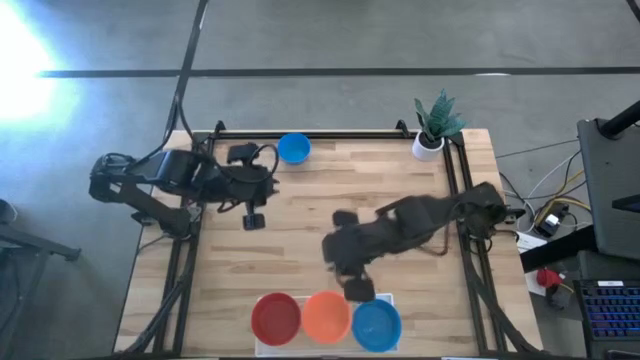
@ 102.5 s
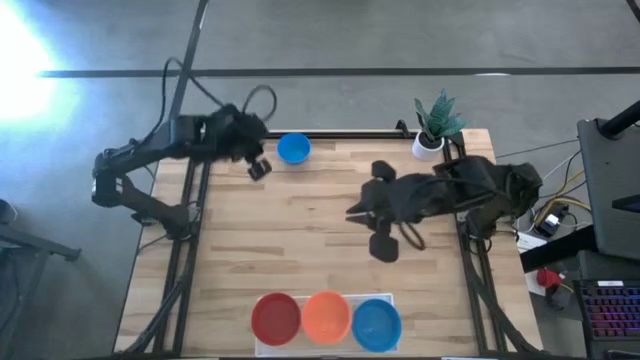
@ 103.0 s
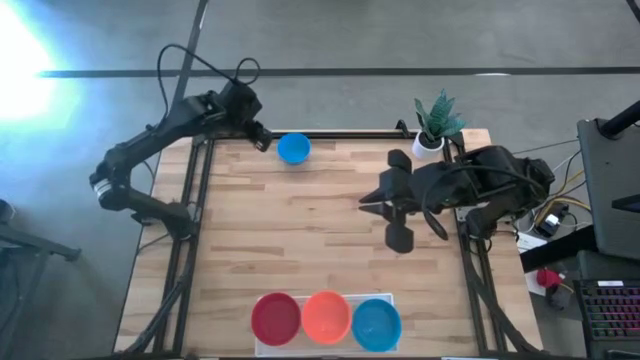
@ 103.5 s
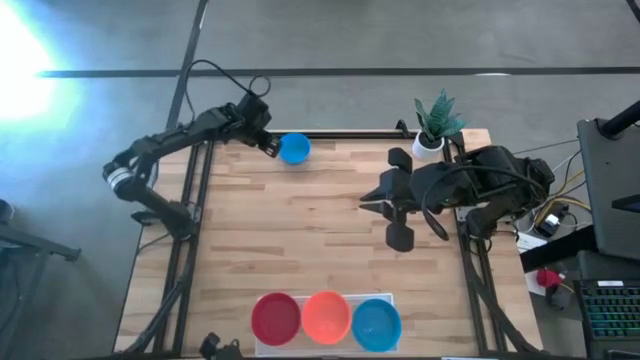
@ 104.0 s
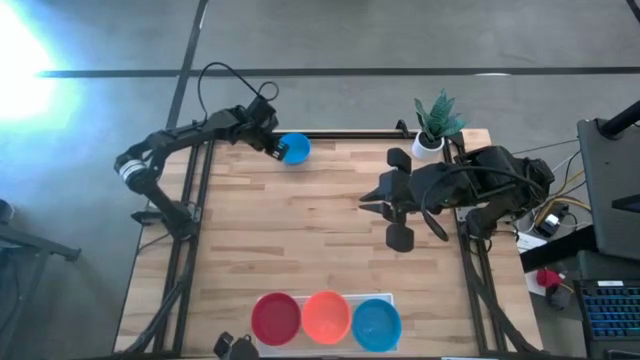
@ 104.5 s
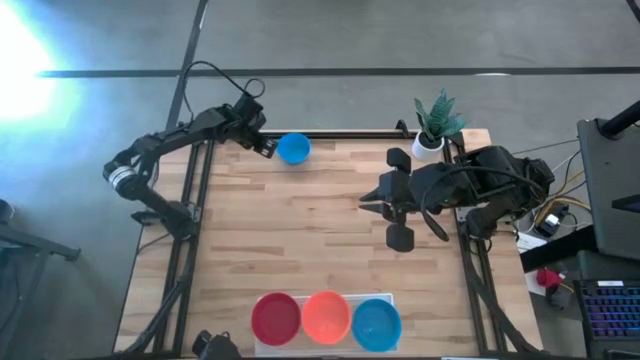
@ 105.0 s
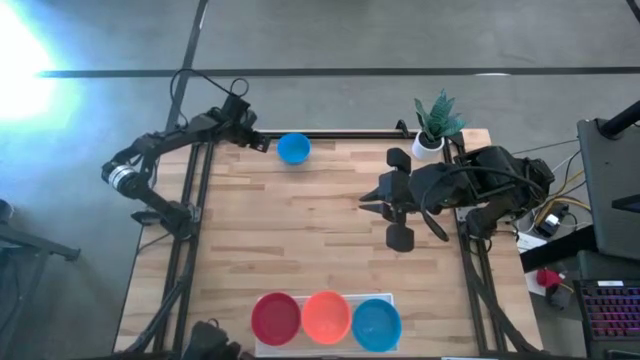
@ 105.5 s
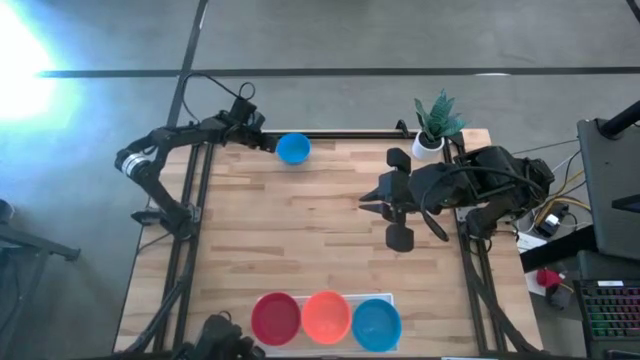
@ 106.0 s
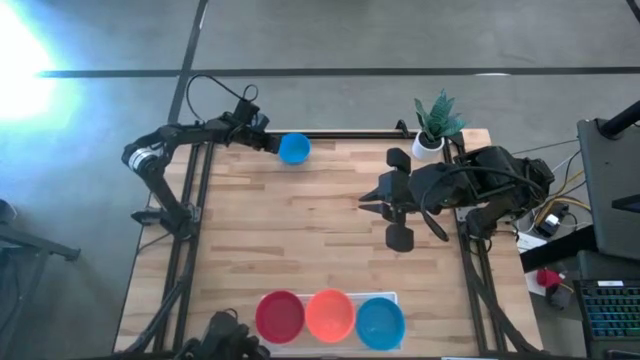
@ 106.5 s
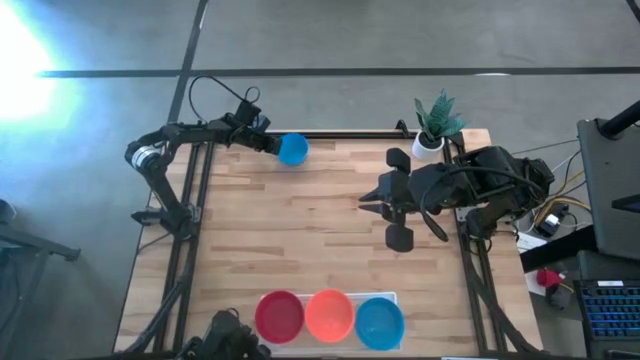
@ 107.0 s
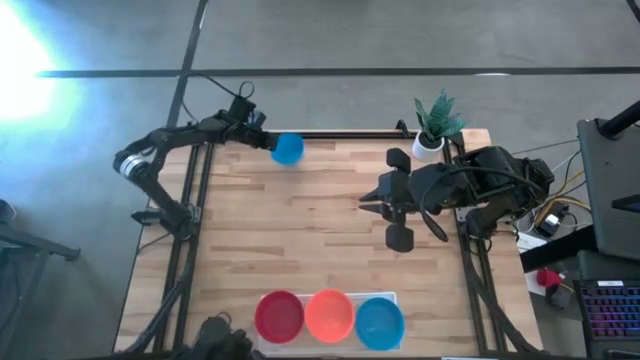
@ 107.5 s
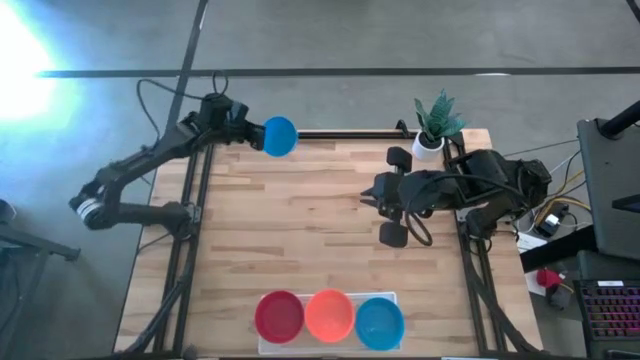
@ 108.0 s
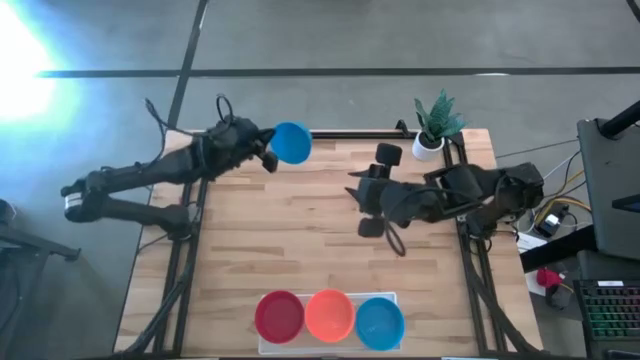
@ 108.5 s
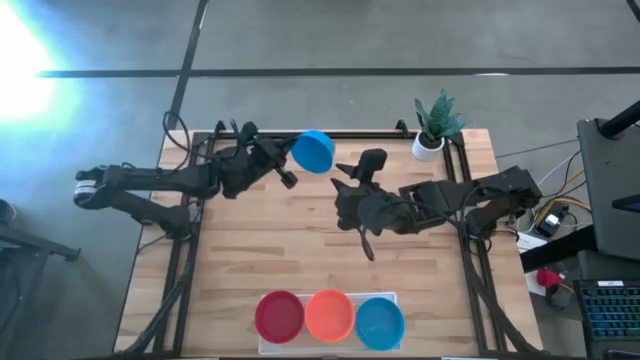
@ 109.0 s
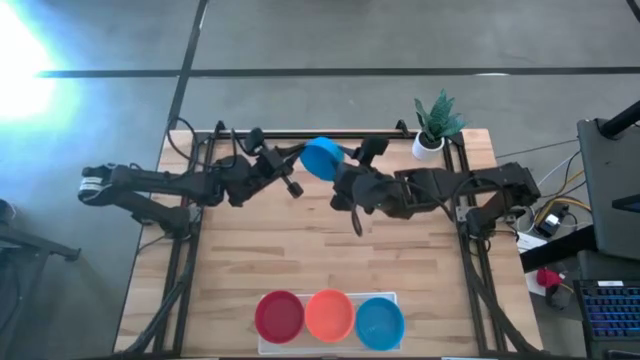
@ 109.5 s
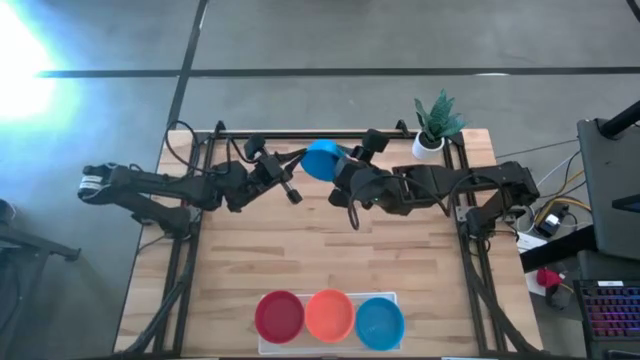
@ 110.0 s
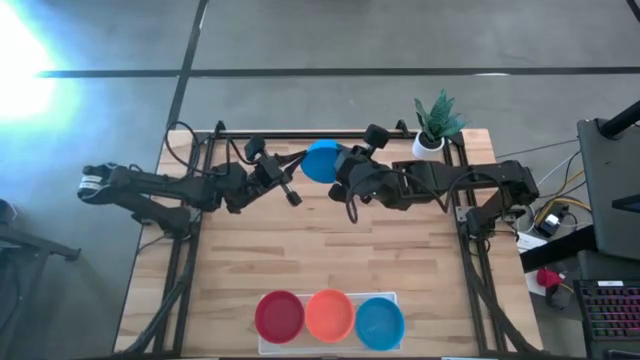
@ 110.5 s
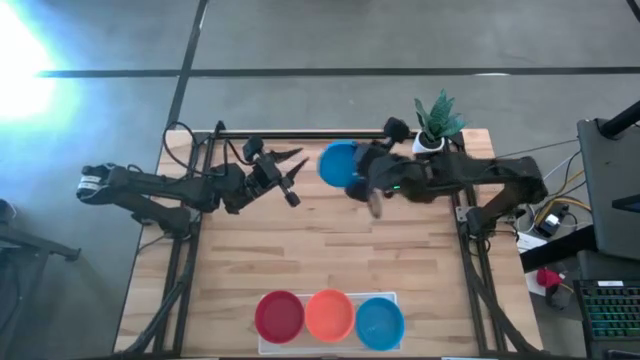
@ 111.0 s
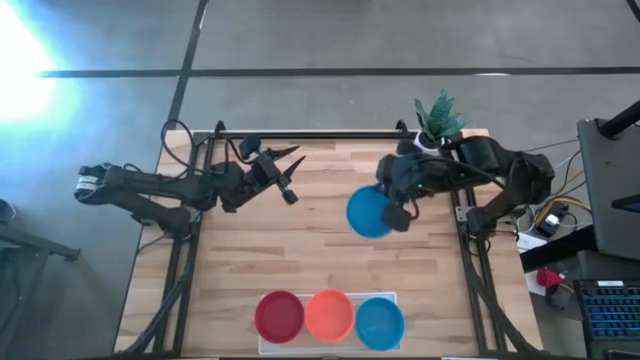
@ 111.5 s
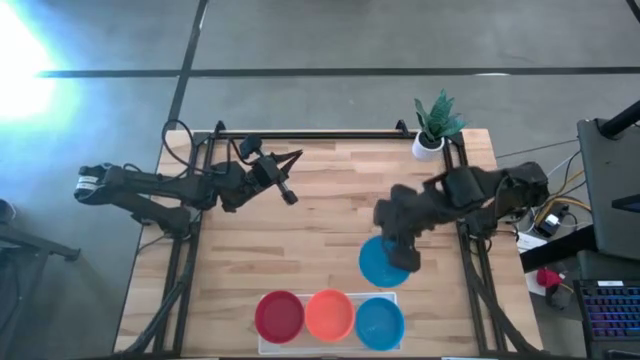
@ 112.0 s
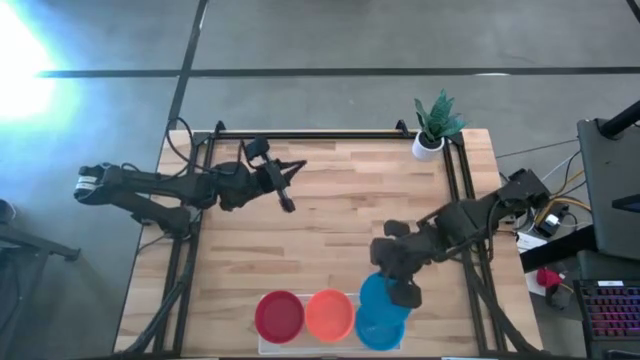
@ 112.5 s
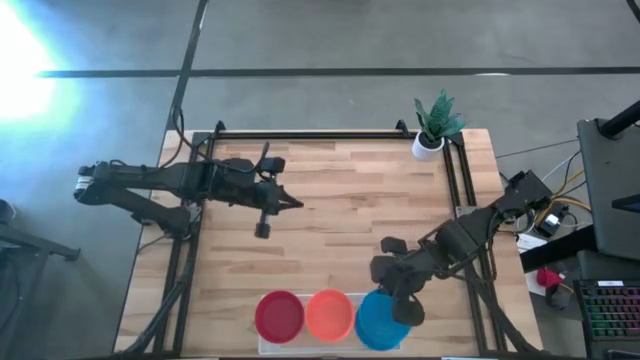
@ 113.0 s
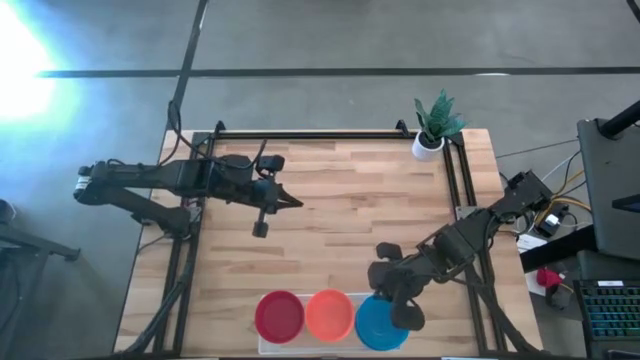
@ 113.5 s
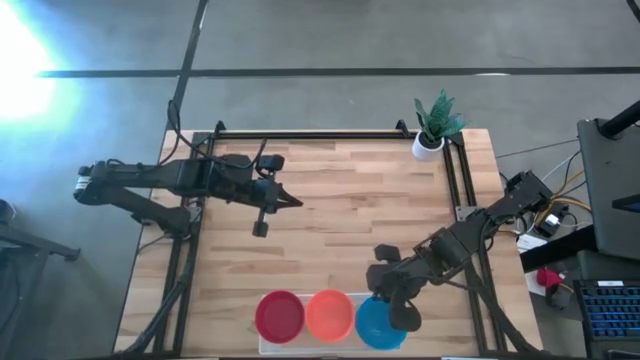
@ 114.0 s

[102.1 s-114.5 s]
Task: Pick & Place Mini bowls
Stack the blue bowl on top of the other blue bowl on the shelf

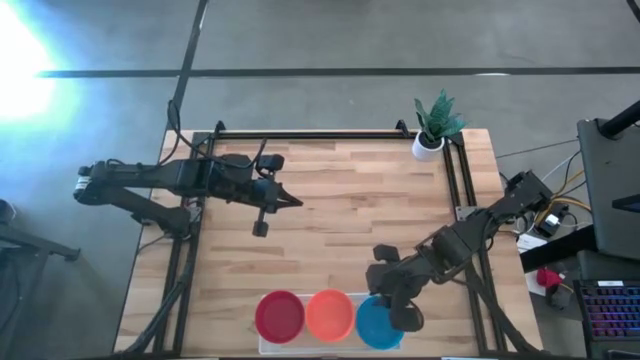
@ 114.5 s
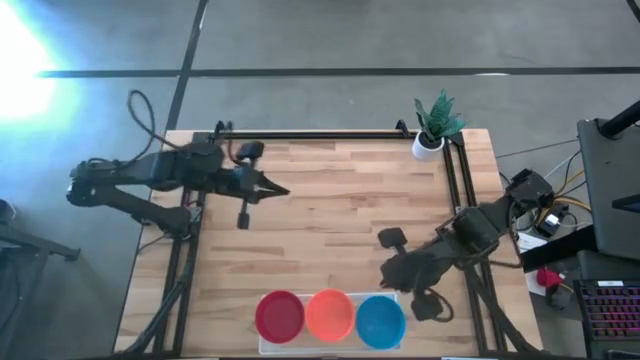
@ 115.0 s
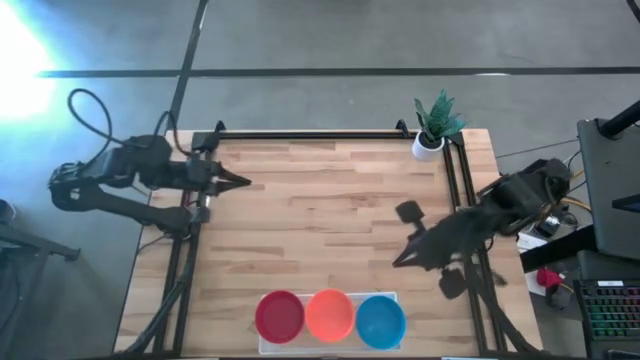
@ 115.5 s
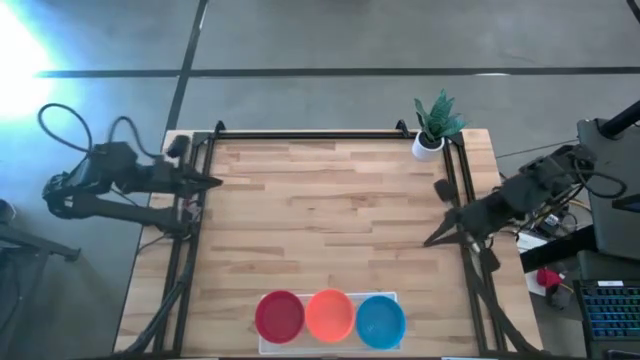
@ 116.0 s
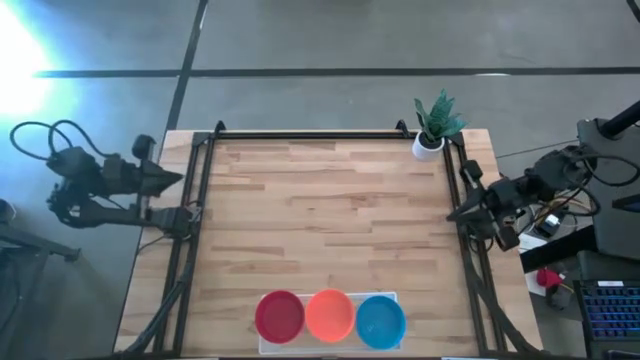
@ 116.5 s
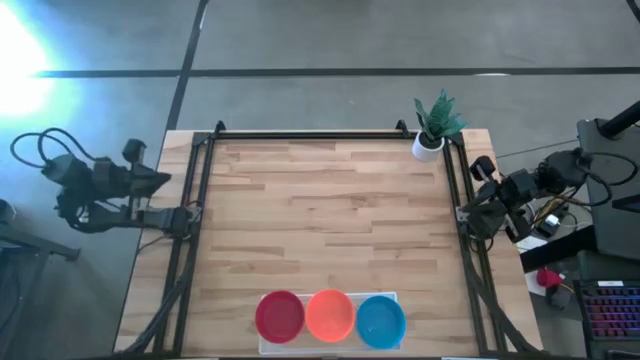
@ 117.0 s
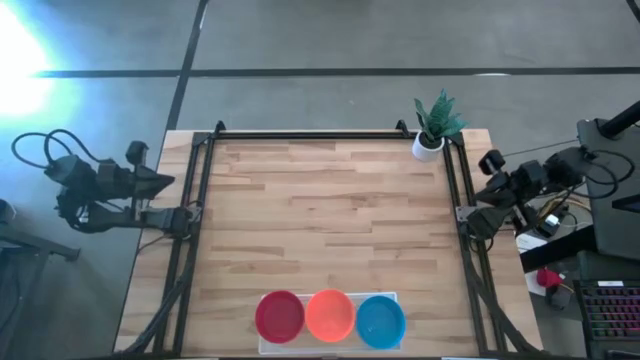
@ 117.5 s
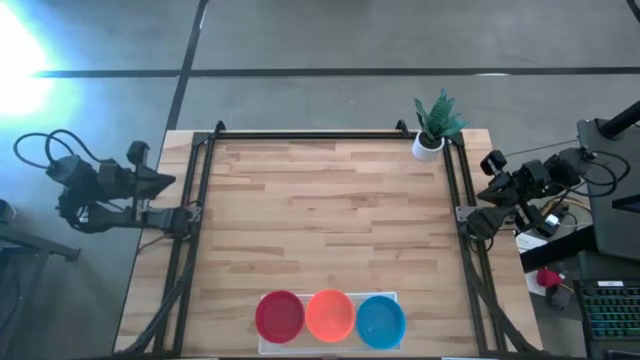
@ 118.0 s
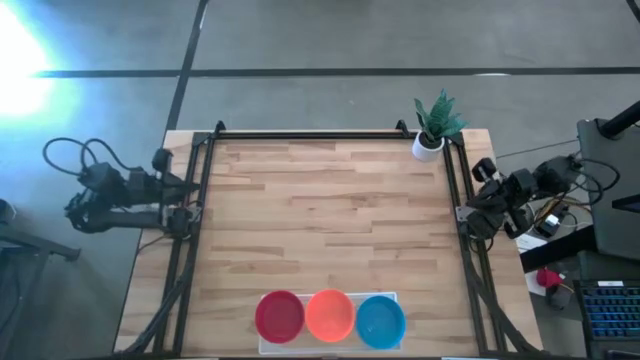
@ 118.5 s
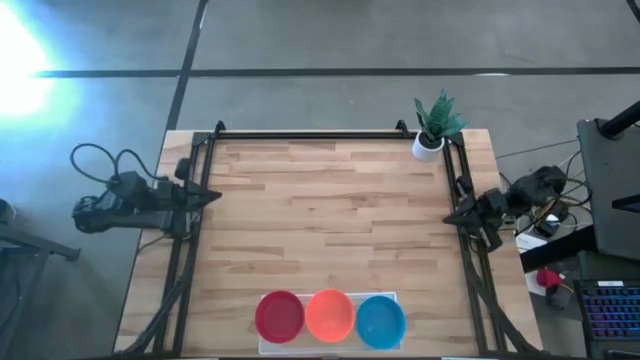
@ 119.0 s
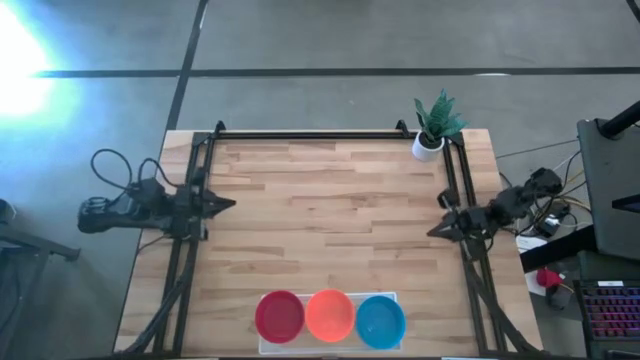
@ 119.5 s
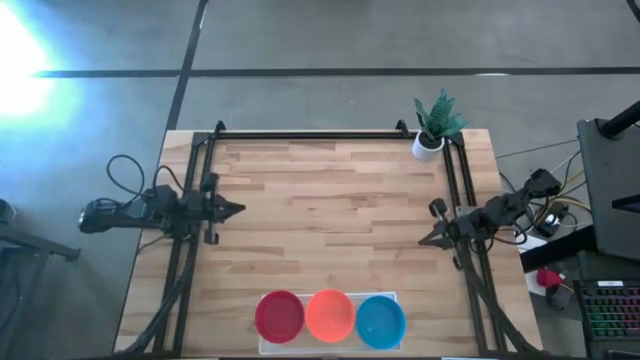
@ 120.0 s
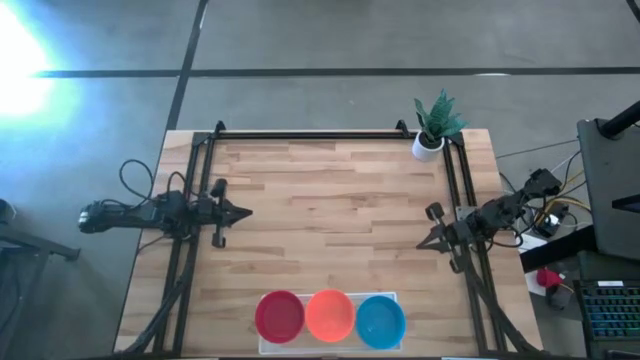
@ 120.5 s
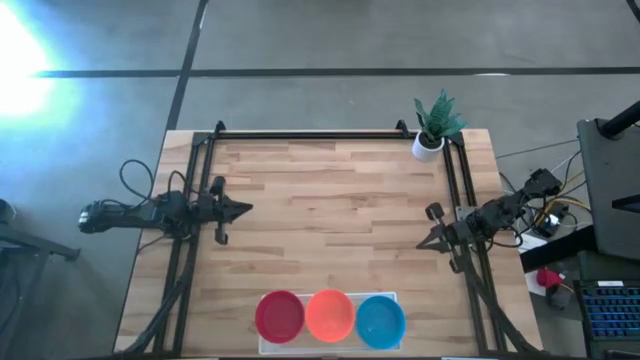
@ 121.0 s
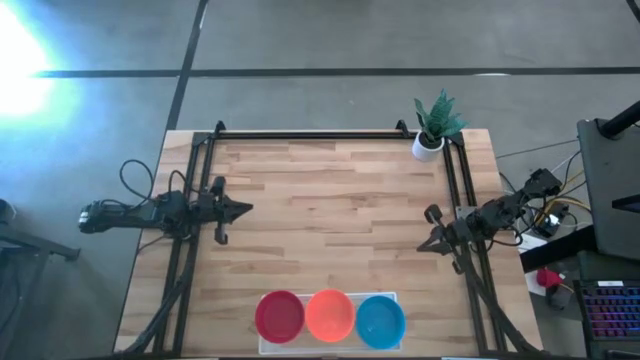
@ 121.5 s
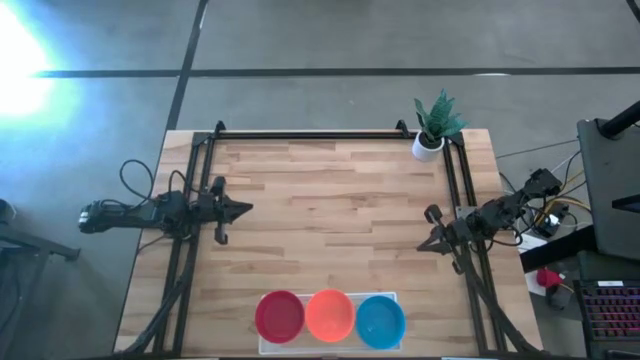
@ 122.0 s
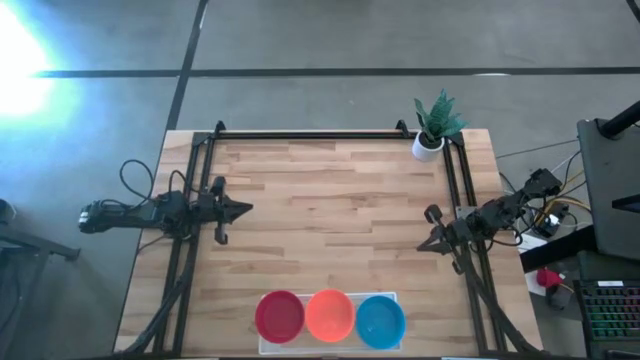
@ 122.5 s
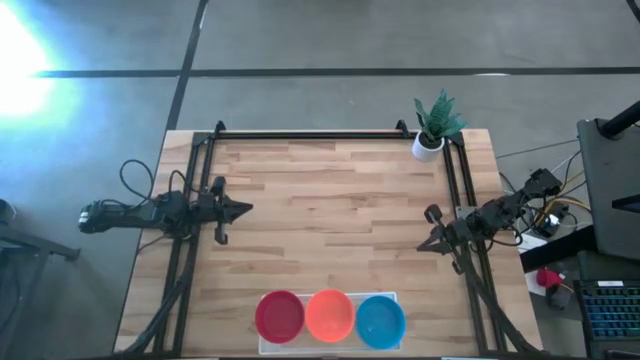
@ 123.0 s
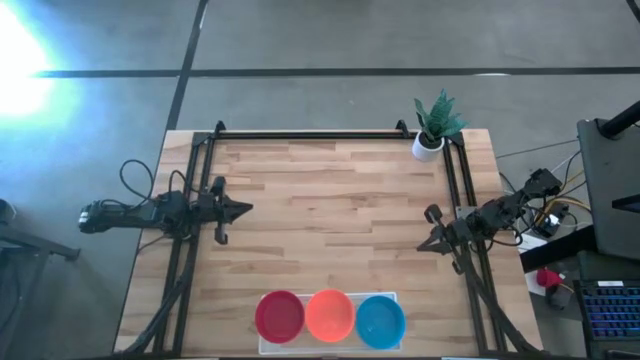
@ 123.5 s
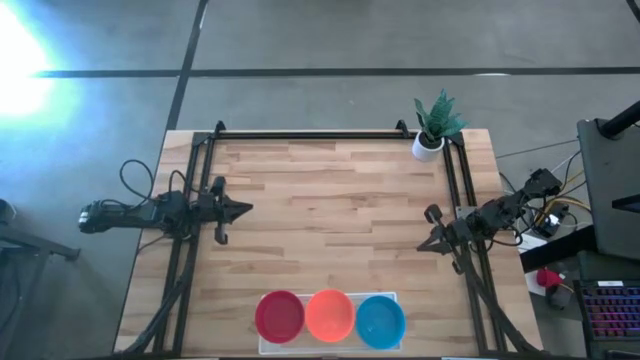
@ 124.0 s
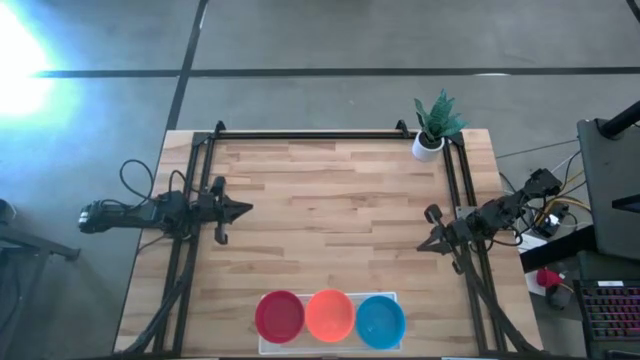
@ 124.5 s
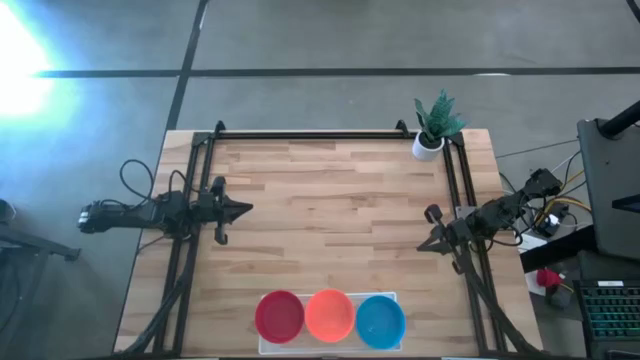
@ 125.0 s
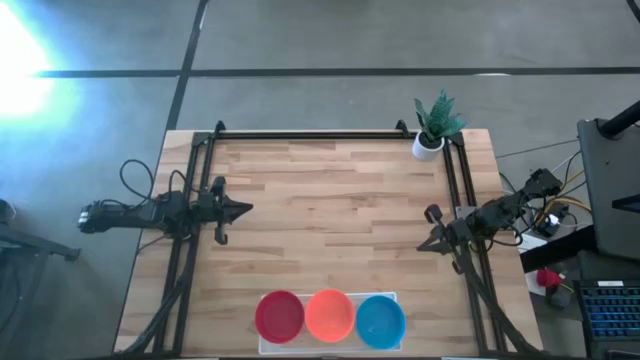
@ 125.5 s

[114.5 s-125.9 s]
Return to Home Position
